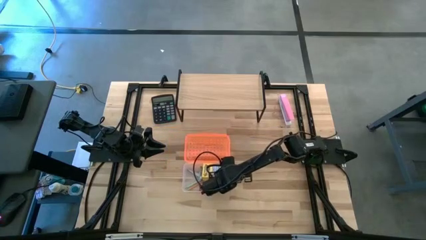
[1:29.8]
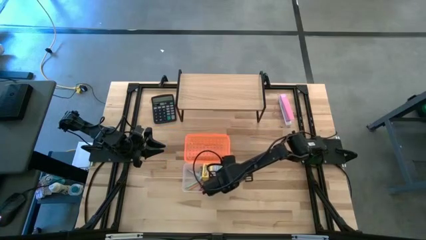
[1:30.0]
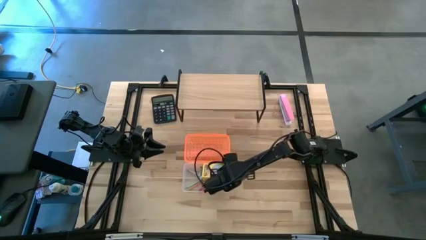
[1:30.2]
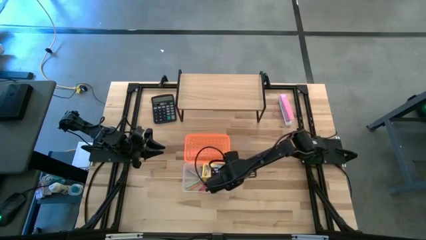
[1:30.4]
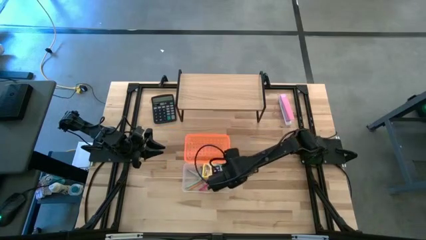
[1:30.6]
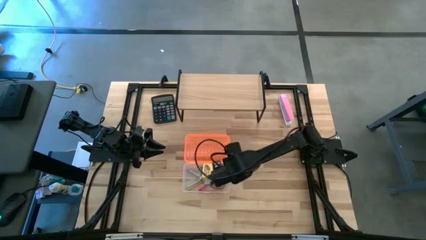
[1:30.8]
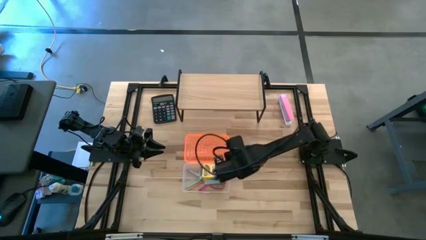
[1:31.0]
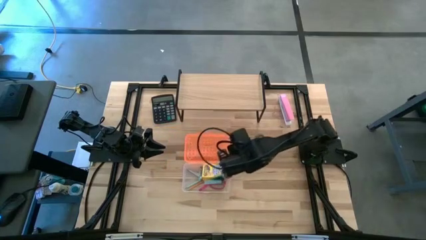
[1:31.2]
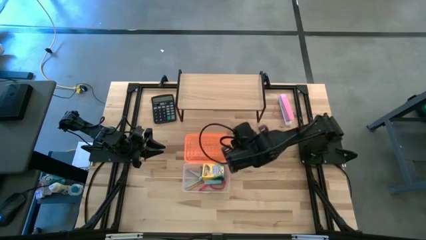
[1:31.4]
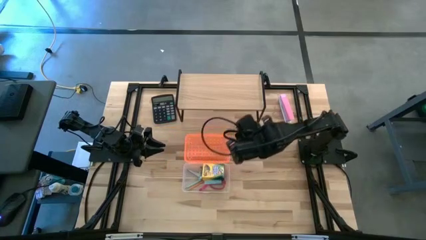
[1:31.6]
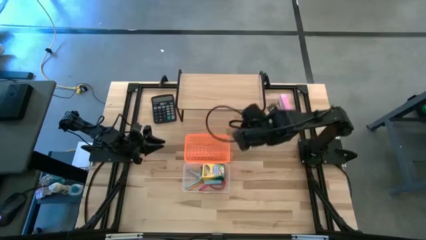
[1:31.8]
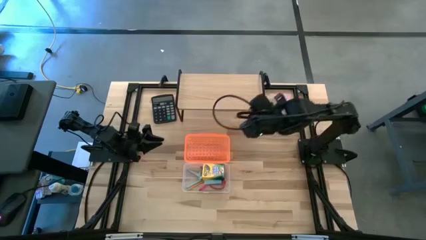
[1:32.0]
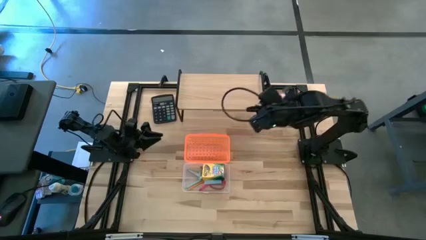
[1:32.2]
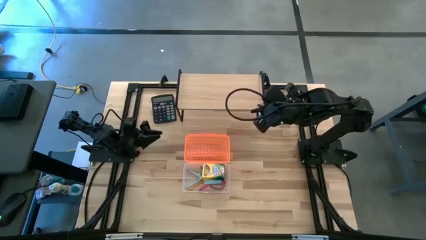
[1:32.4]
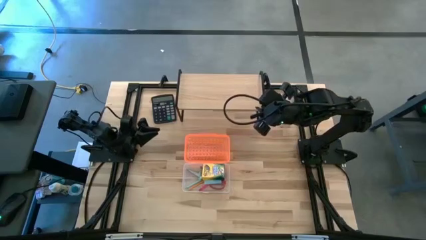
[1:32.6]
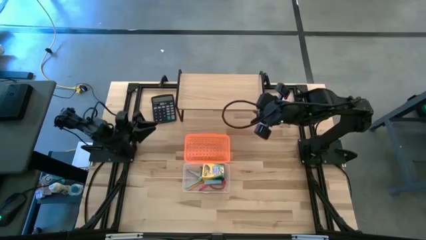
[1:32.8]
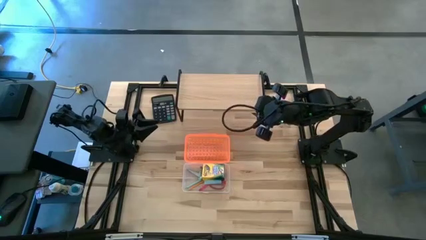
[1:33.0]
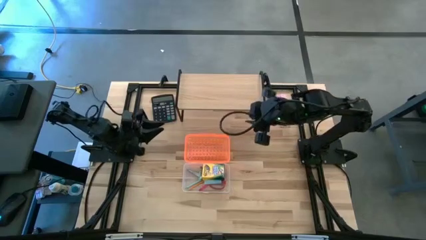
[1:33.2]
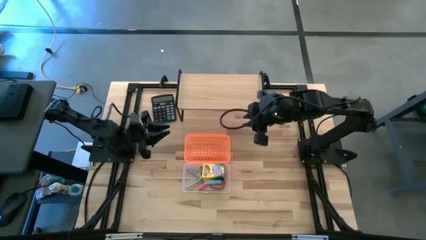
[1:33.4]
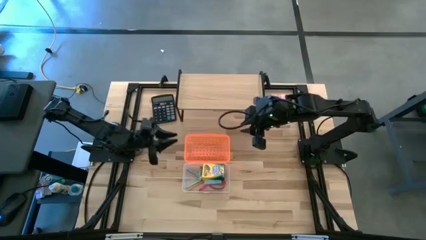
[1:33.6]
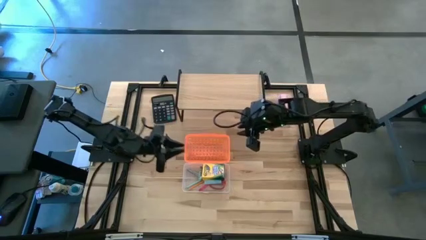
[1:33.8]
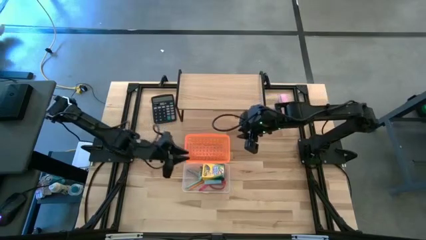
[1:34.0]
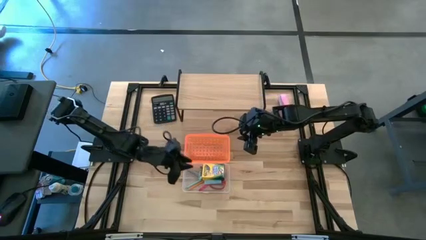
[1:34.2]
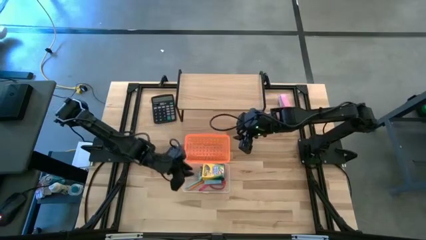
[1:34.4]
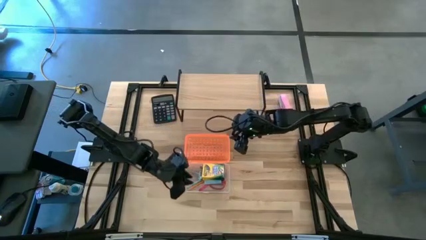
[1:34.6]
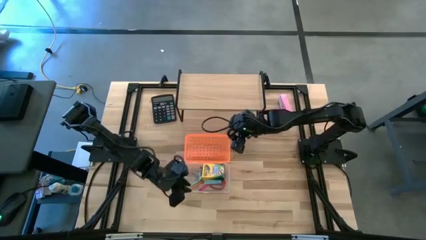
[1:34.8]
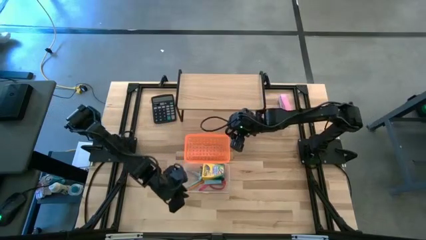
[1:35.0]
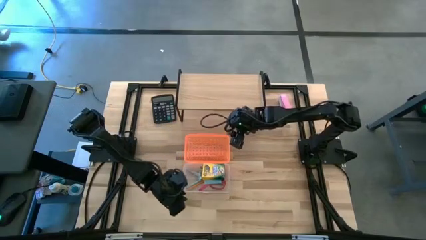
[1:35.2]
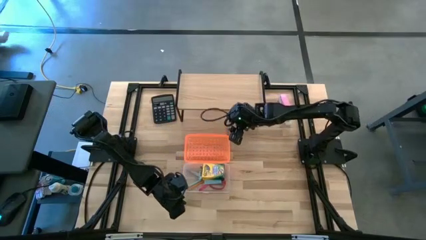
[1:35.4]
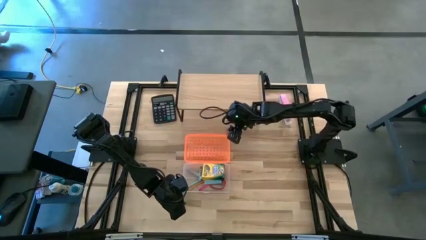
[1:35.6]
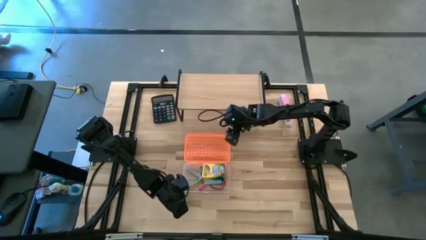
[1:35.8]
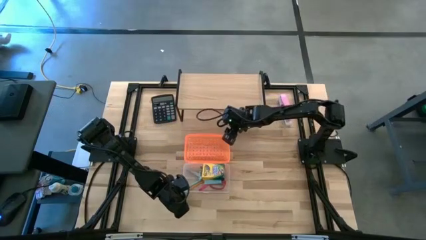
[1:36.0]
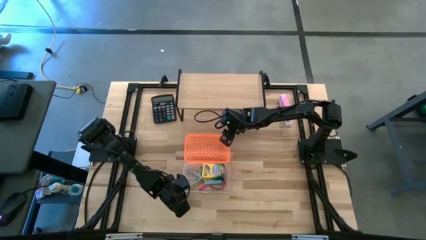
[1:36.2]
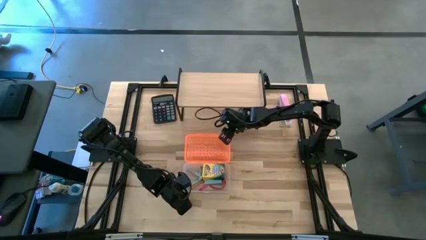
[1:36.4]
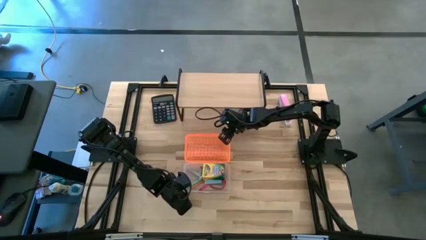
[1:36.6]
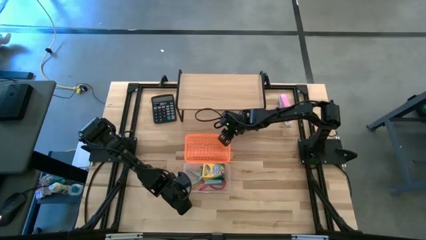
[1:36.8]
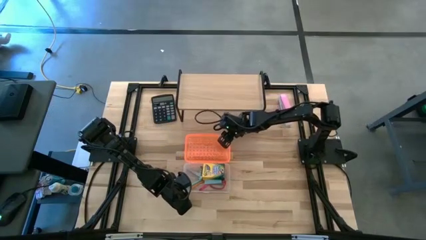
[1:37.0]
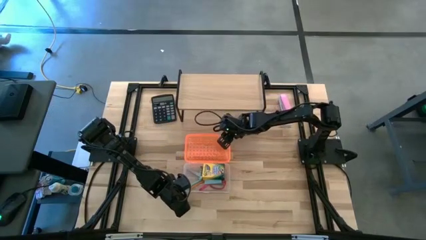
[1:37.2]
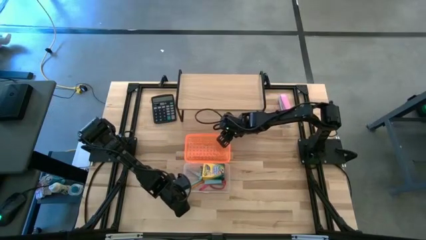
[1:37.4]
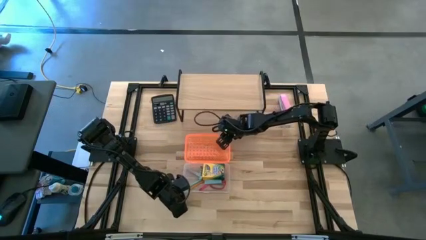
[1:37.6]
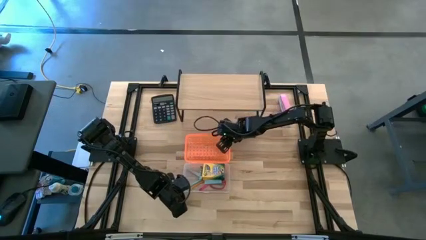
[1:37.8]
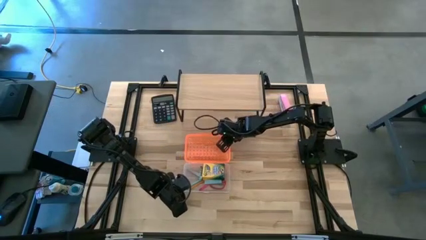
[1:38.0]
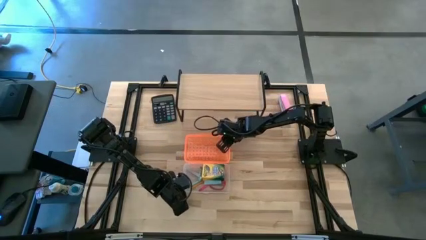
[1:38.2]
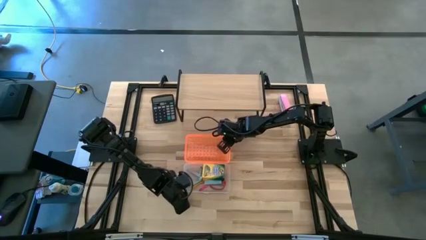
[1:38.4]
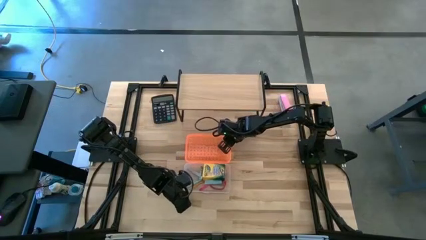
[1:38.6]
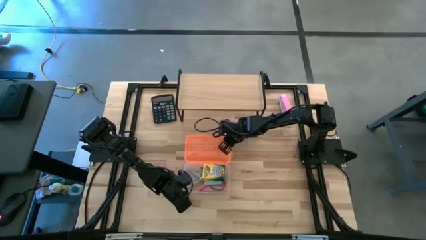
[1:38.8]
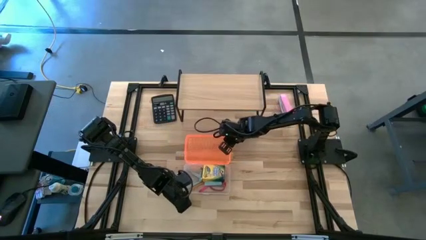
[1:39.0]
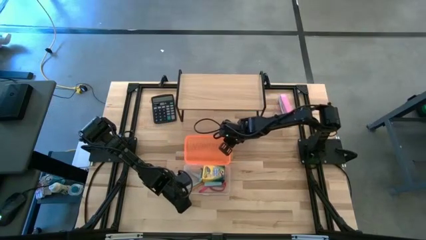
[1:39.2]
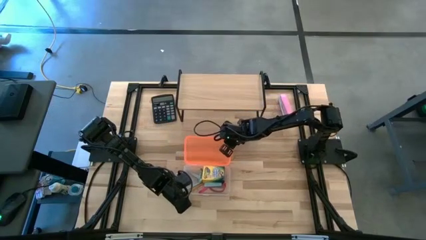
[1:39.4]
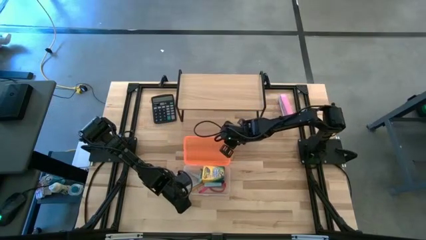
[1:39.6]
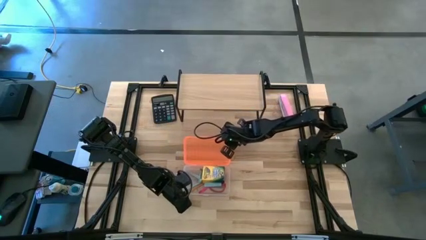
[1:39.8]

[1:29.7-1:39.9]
Task: Pack school essentials
Close the supply box

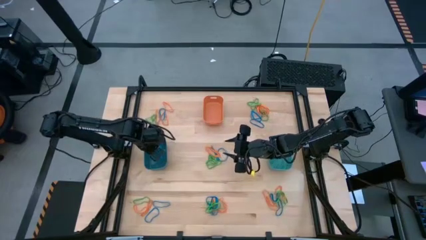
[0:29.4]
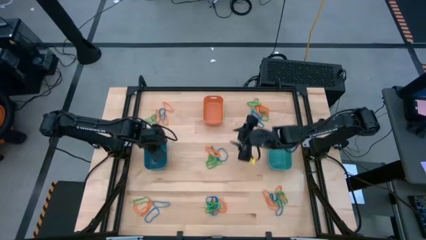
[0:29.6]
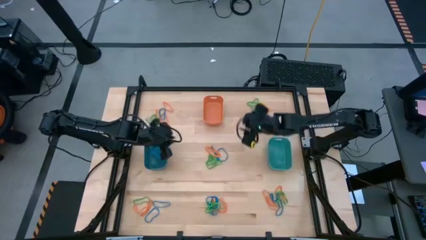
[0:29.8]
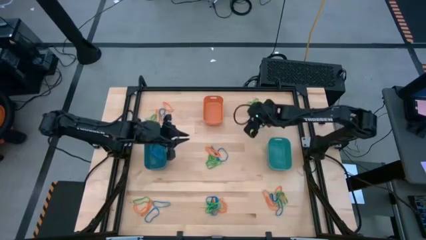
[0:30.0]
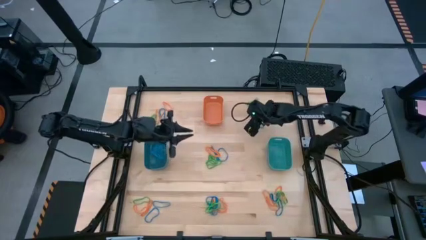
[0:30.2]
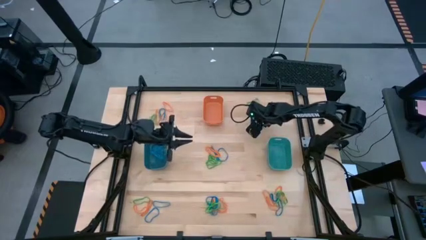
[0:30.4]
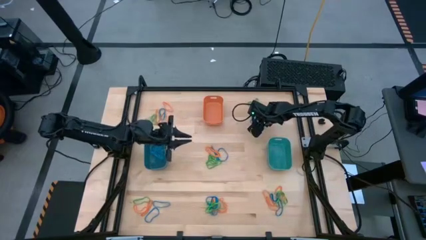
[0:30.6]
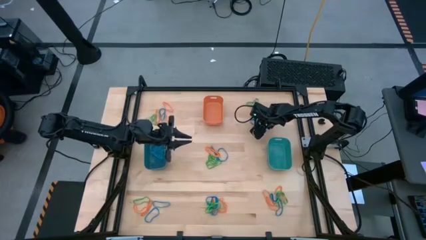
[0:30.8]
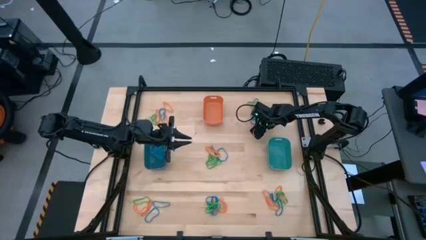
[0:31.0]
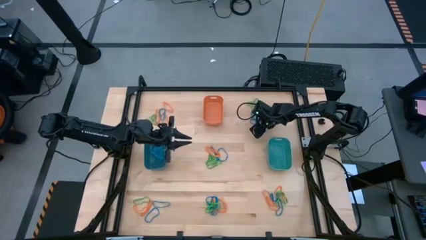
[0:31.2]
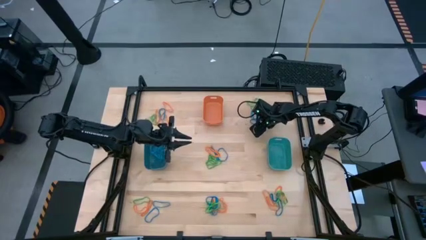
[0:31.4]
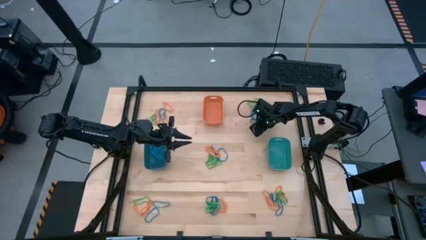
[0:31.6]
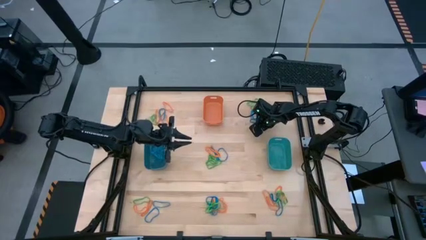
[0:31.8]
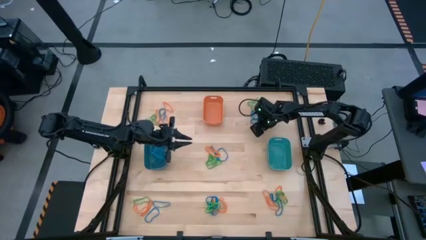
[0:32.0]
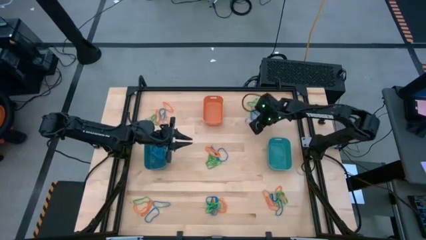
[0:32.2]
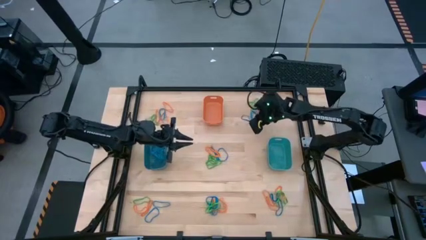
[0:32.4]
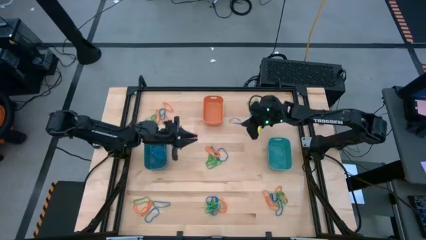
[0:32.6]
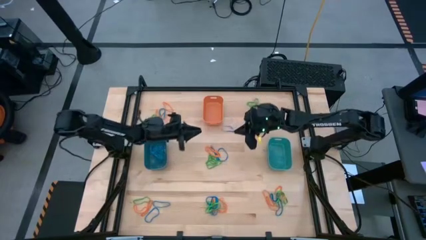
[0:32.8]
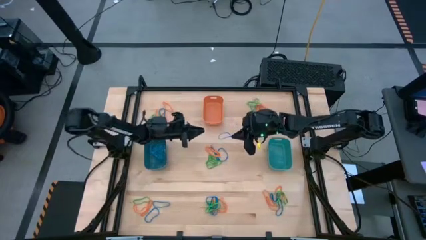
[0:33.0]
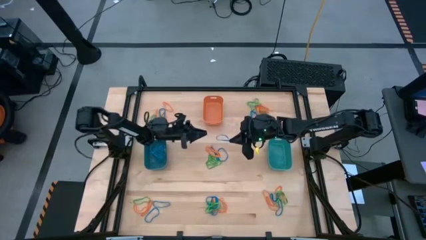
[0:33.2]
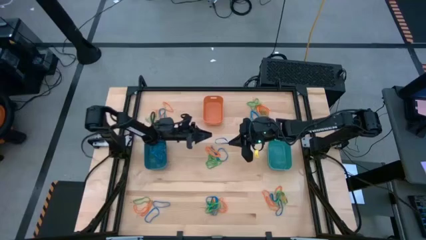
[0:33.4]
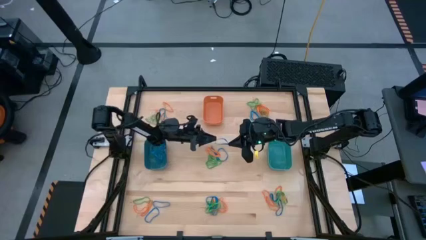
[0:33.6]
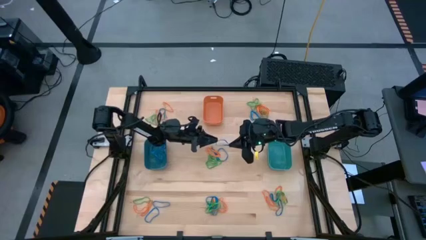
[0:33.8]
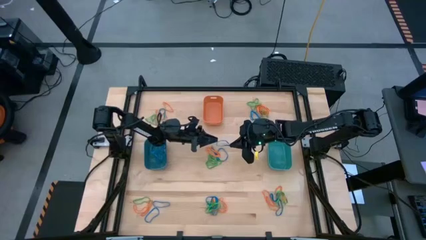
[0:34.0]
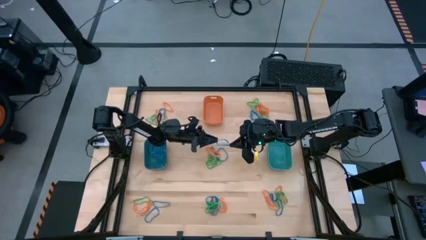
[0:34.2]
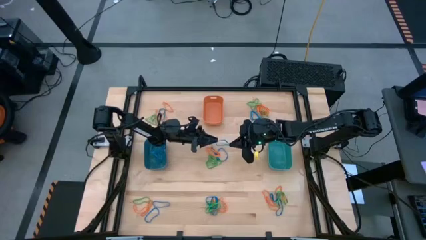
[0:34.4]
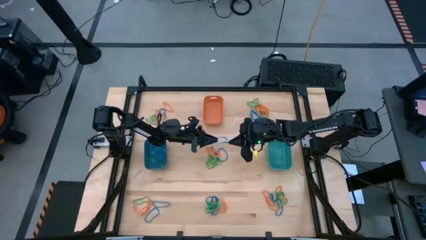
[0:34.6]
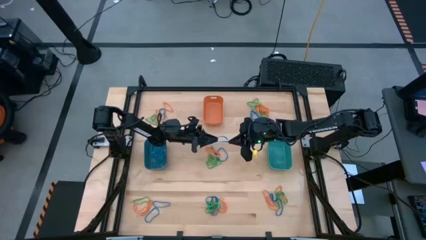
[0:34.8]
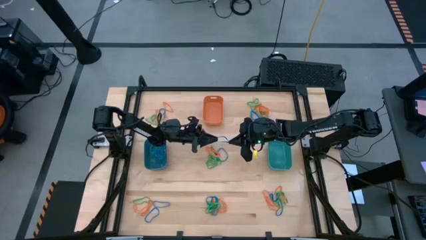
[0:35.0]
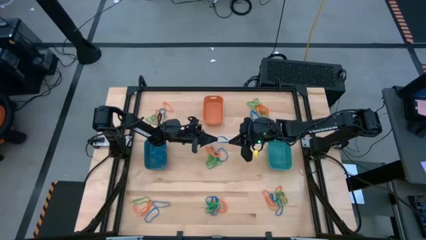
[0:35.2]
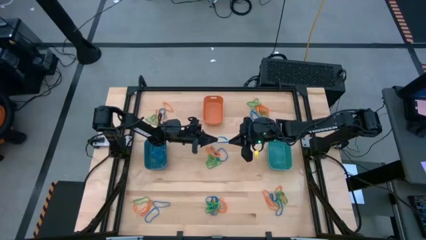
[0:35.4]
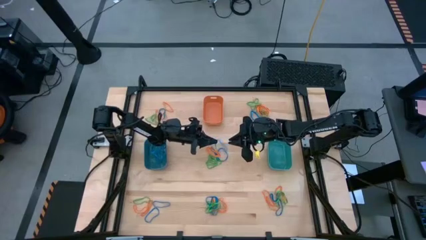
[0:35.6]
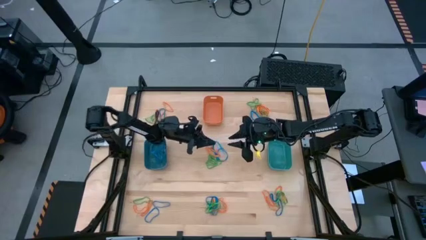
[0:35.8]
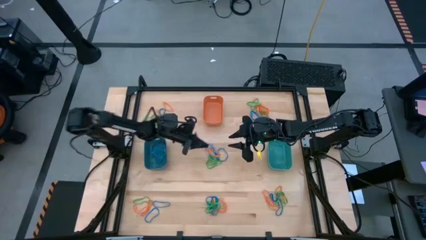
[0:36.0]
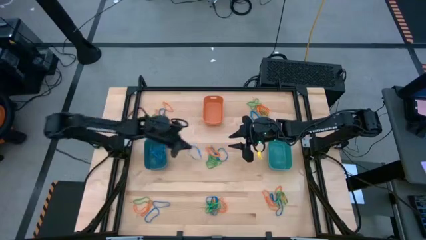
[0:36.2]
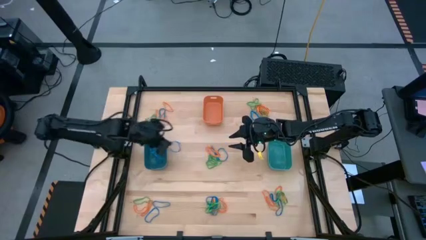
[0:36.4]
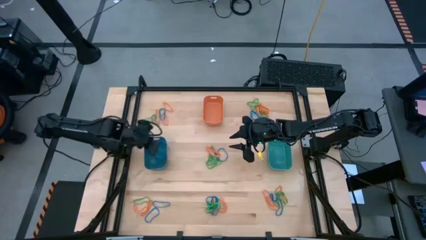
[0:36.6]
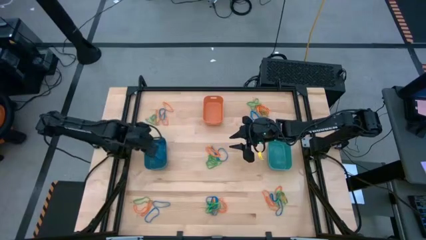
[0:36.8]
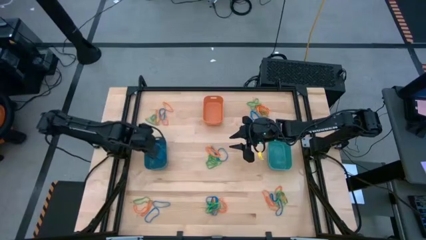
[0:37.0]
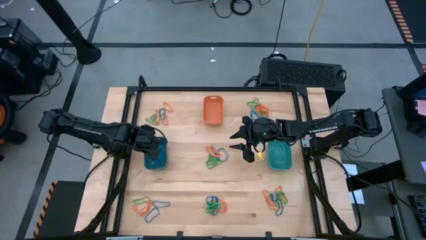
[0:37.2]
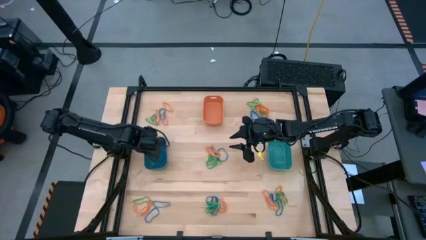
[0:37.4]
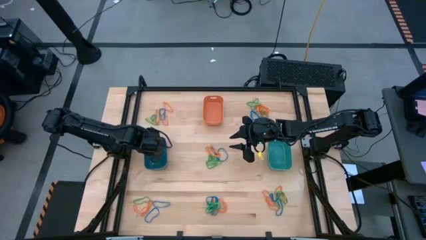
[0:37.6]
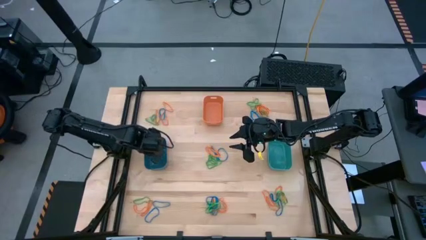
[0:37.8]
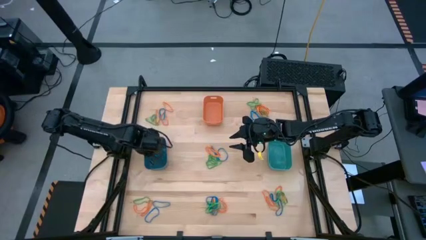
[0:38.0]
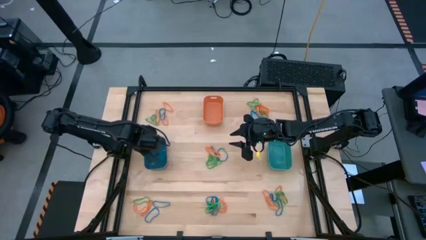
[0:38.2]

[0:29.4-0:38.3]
Task: Sort rubber bands into baskets
Put the blue rubber band into the blue bin
